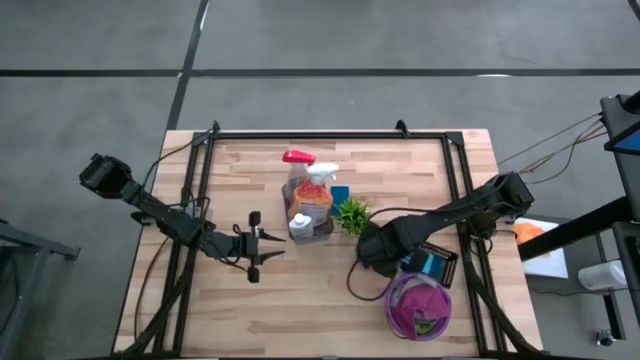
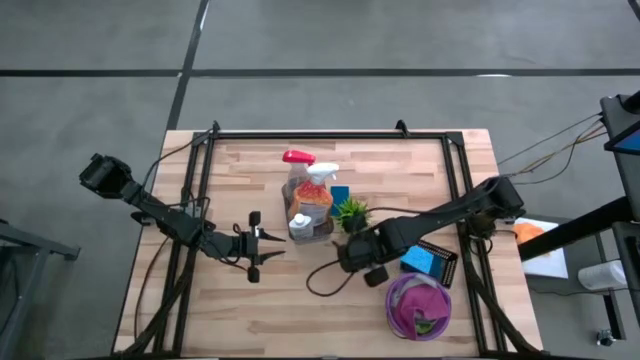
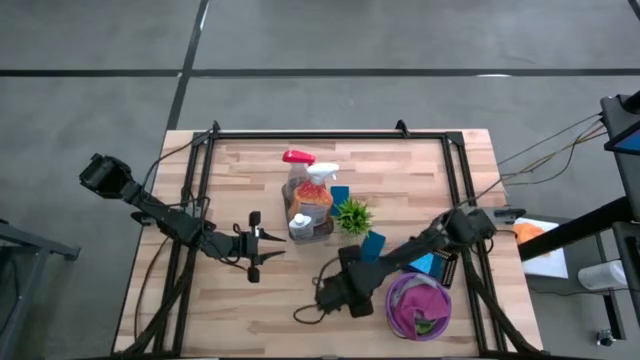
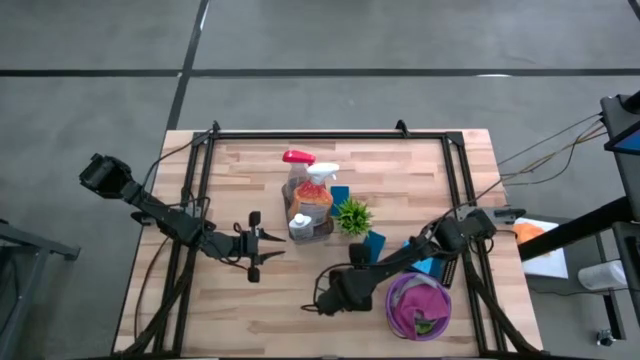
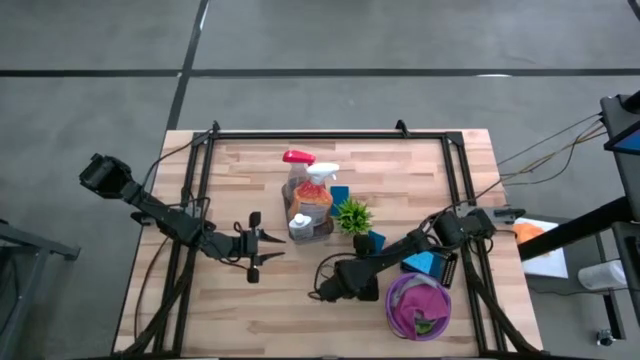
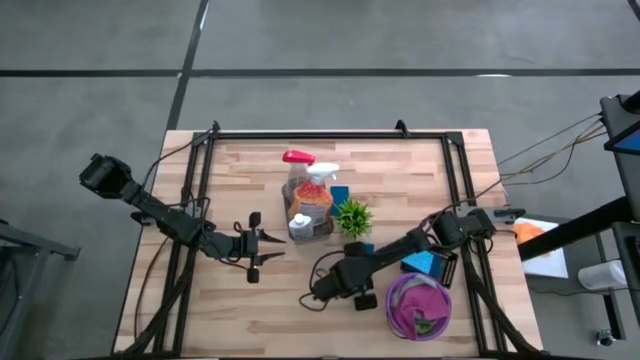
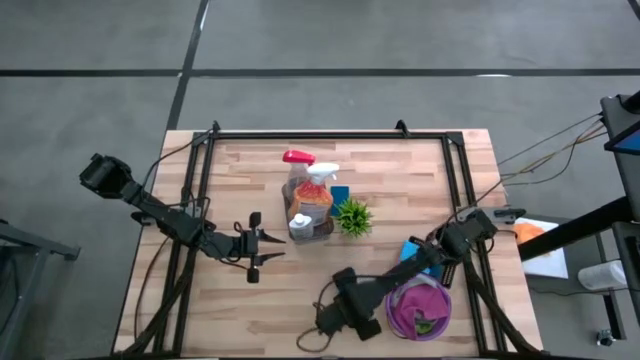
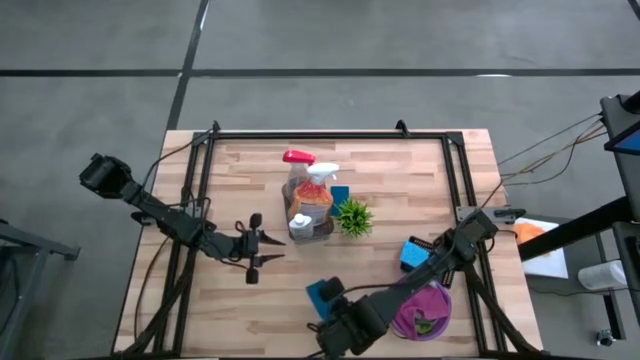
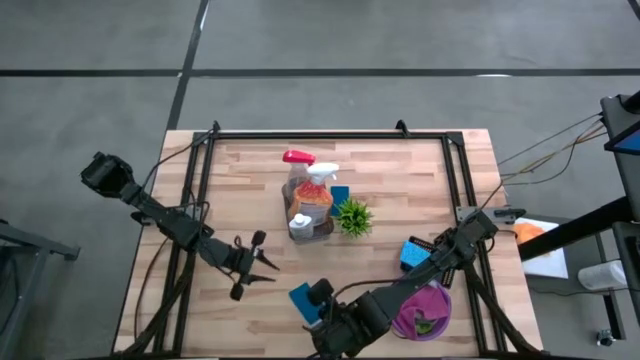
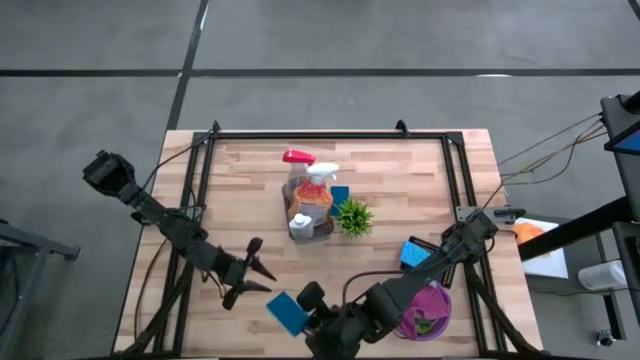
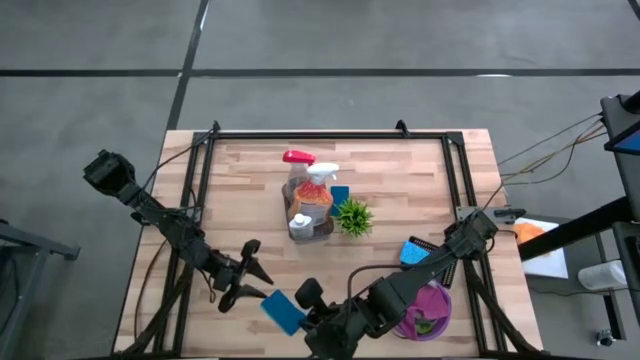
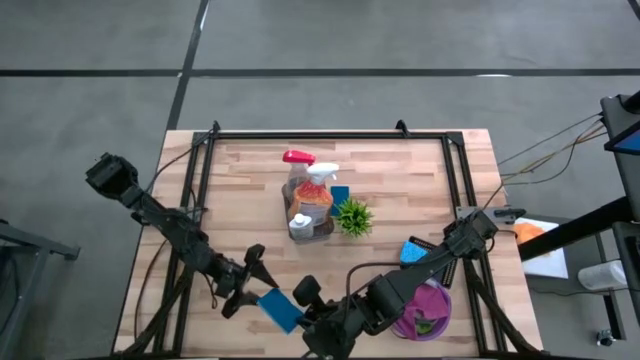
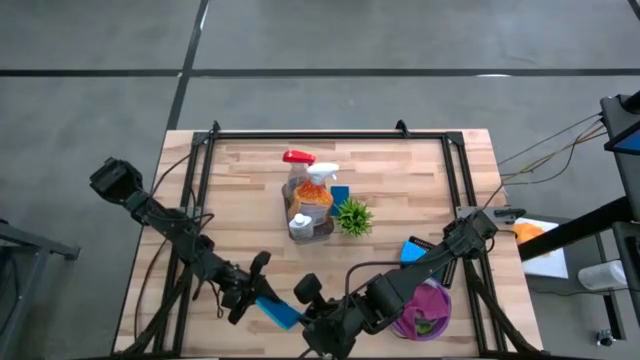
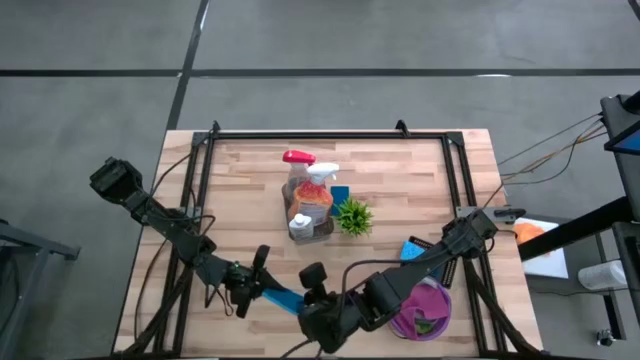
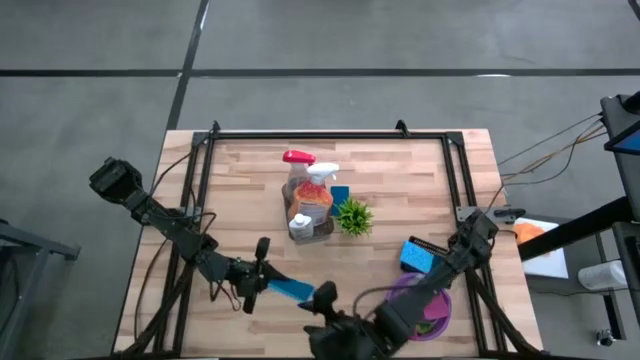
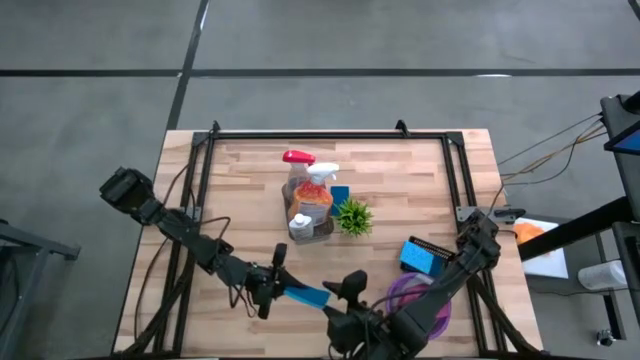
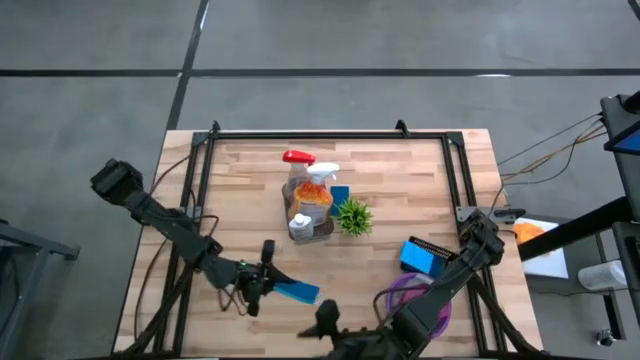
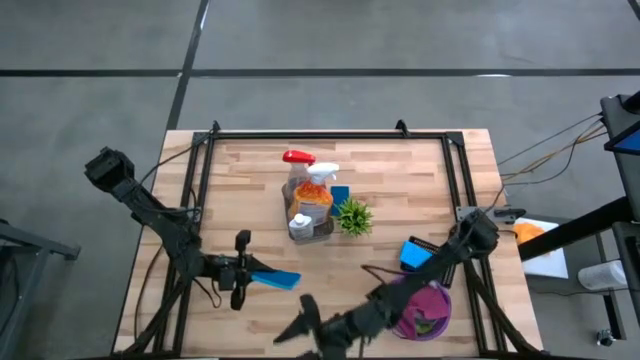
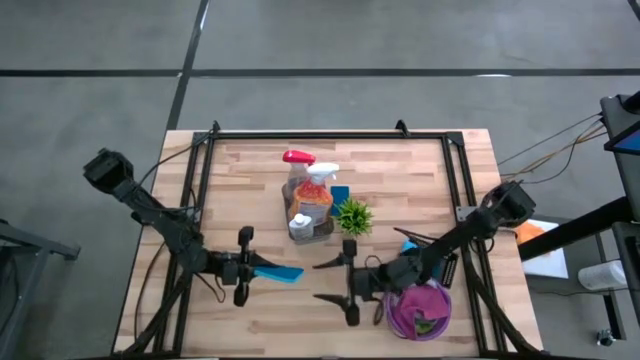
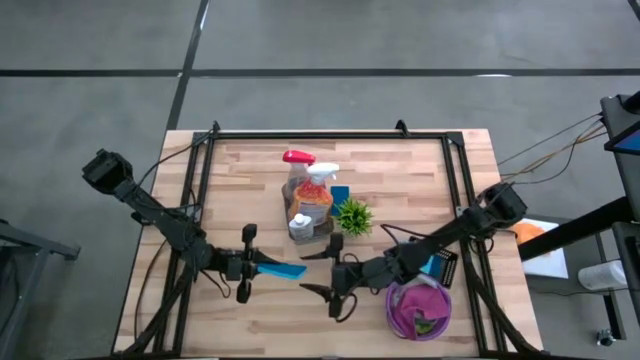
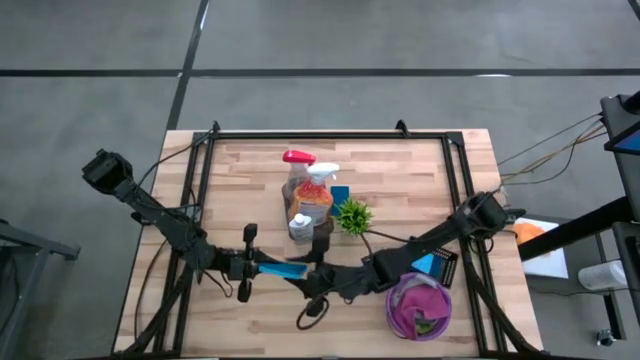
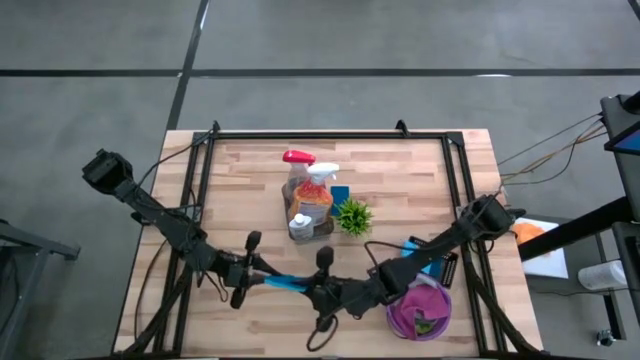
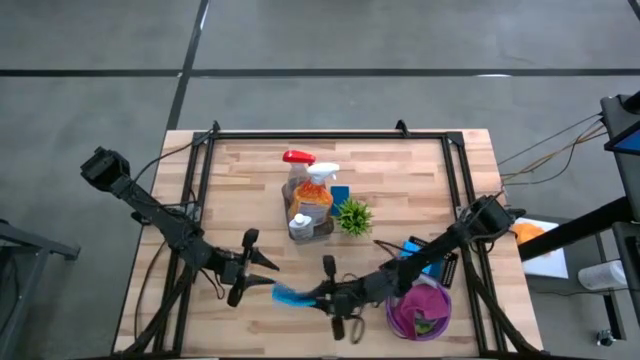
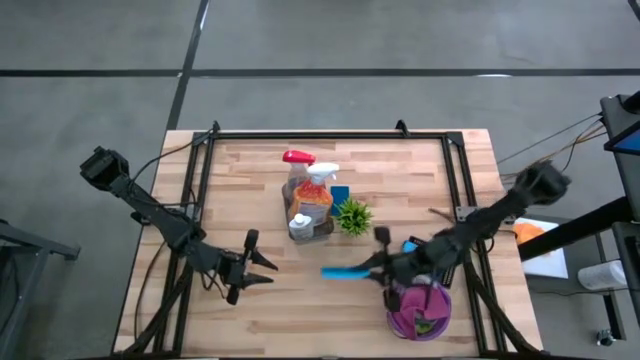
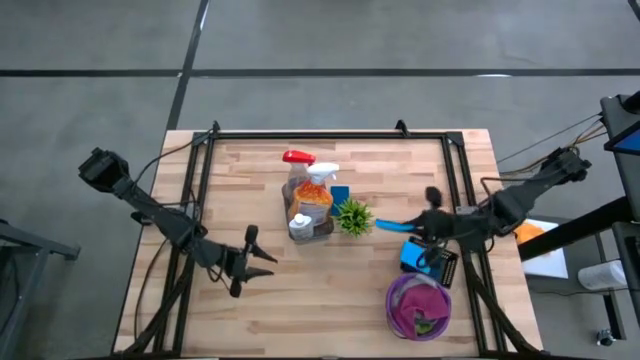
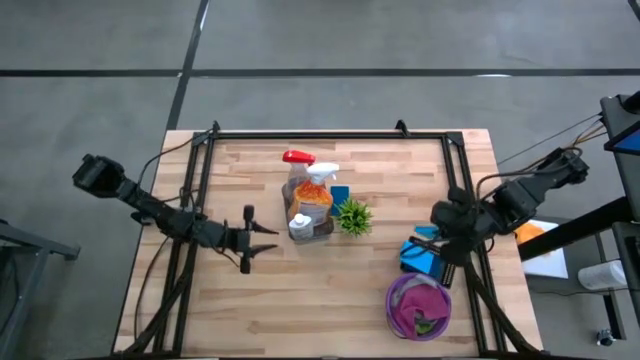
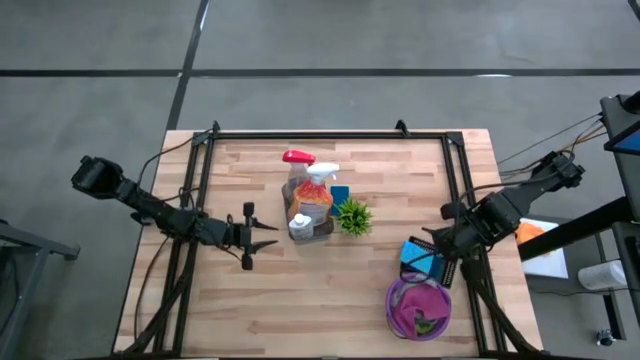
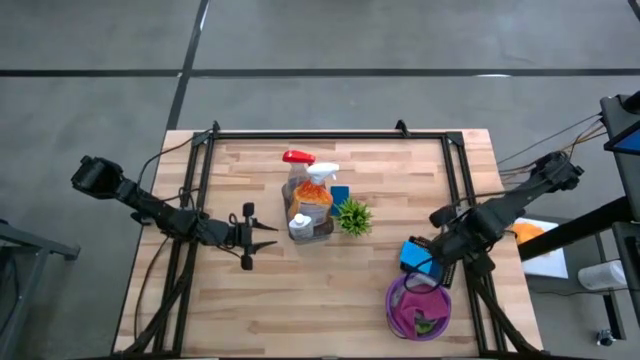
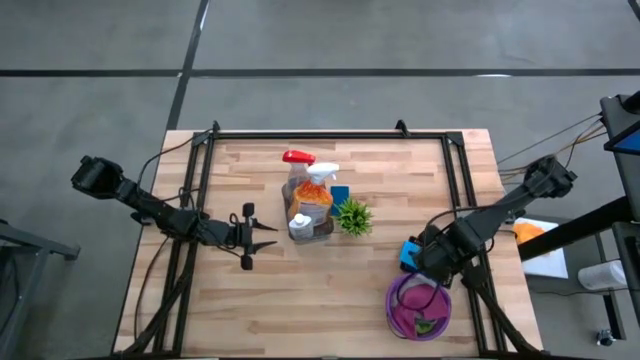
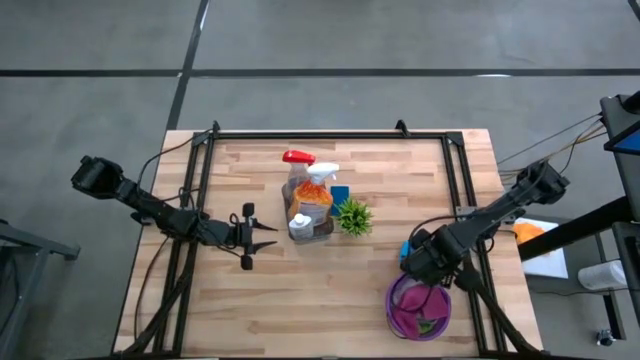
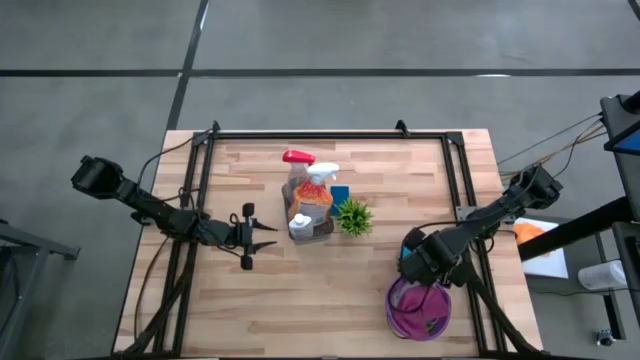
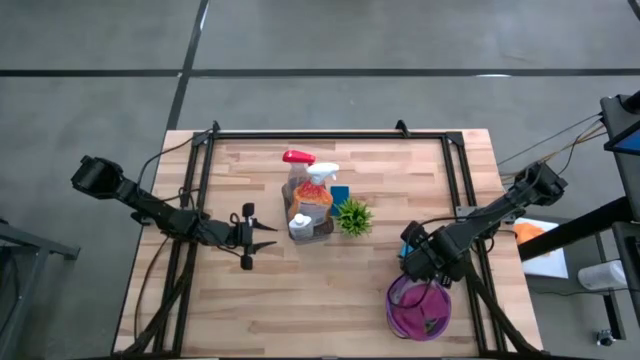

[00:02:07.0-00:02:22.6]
Task: Pick & Place Kitchen Items
Put the blue sponge into the black bin
